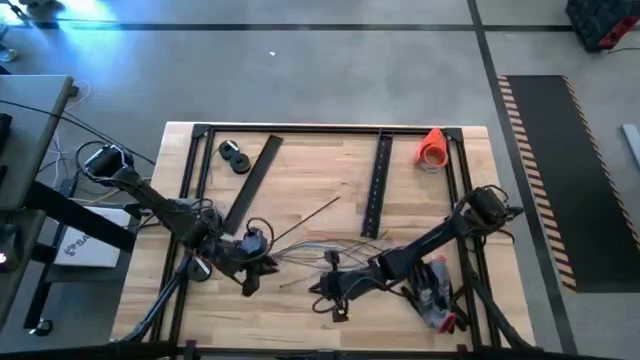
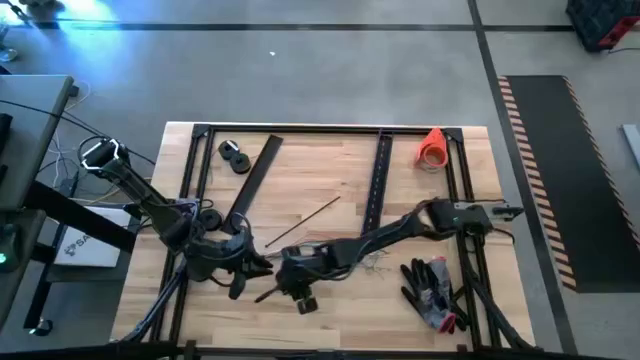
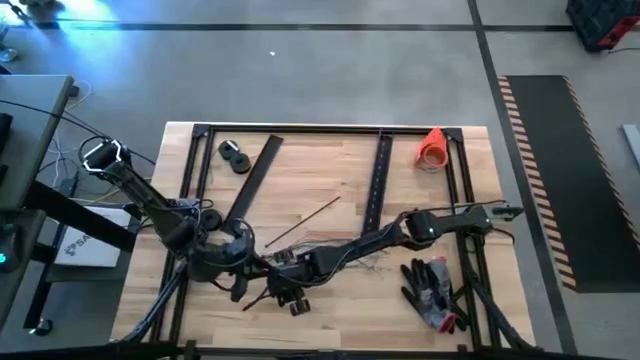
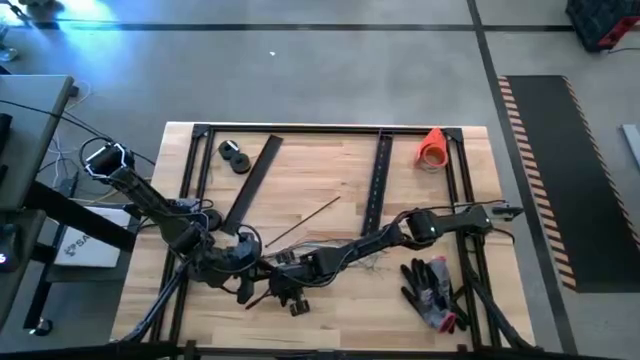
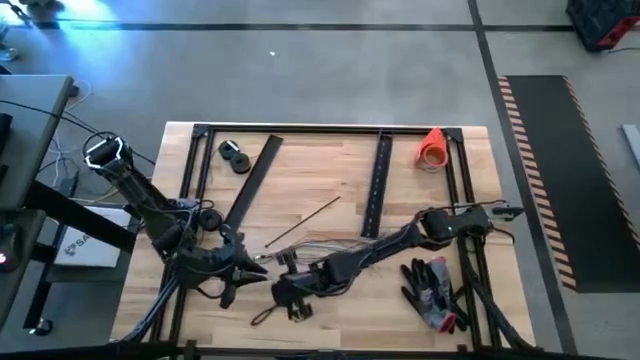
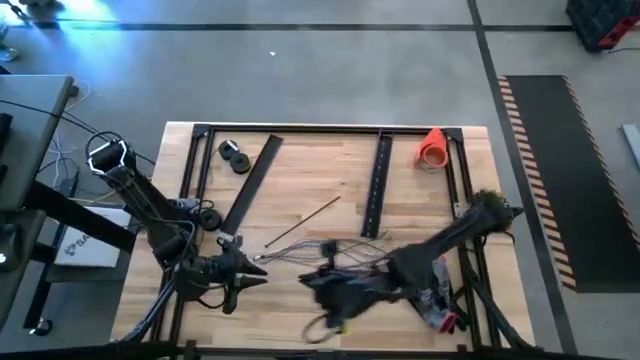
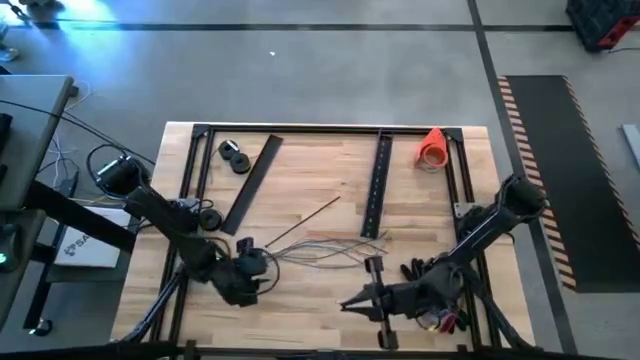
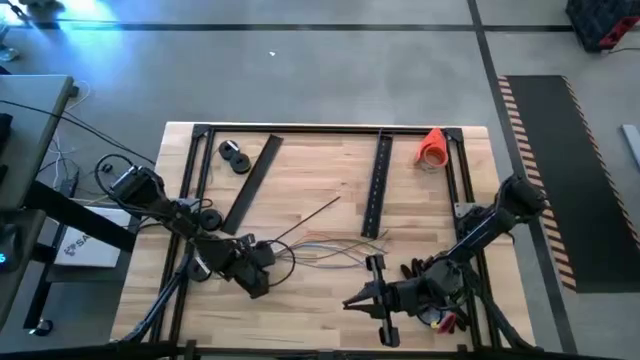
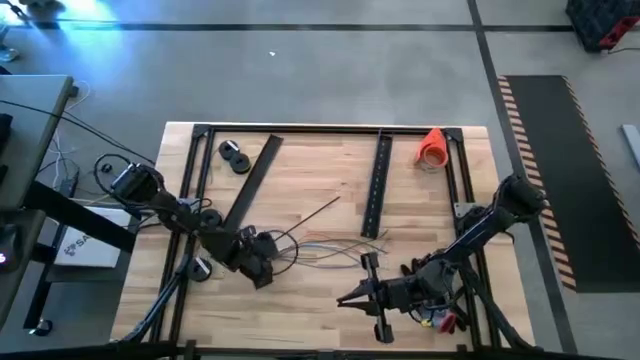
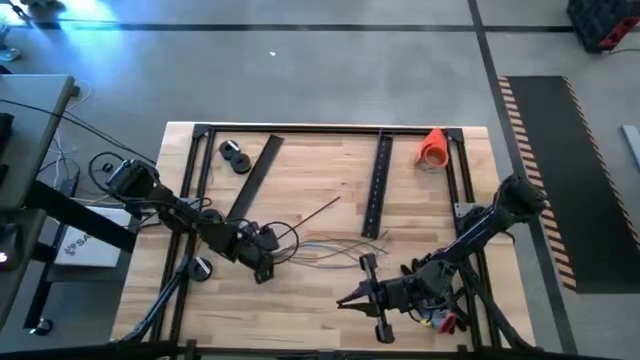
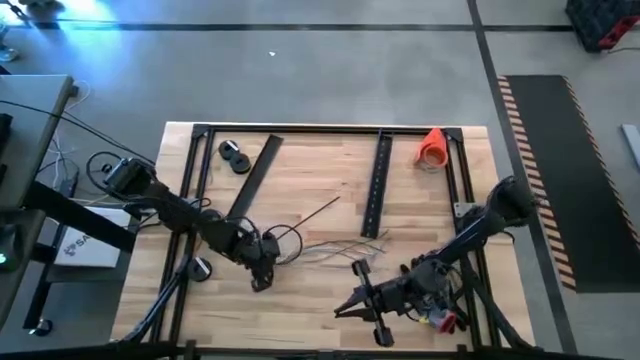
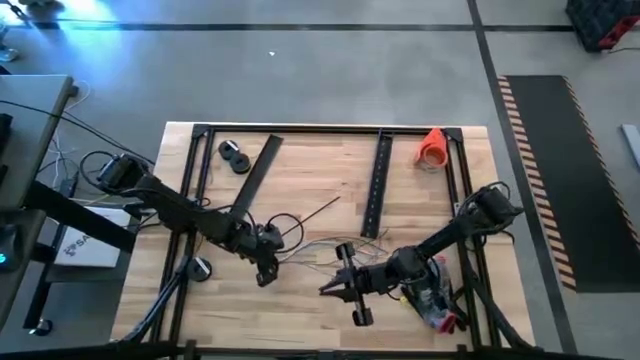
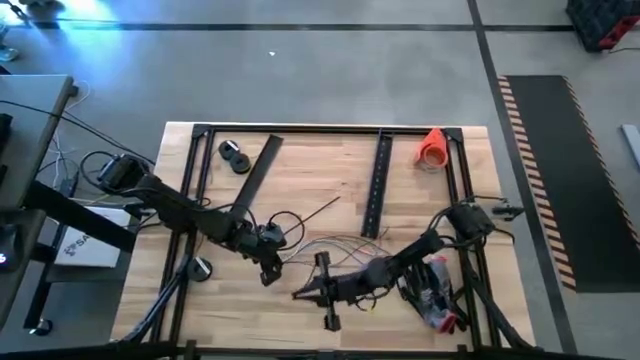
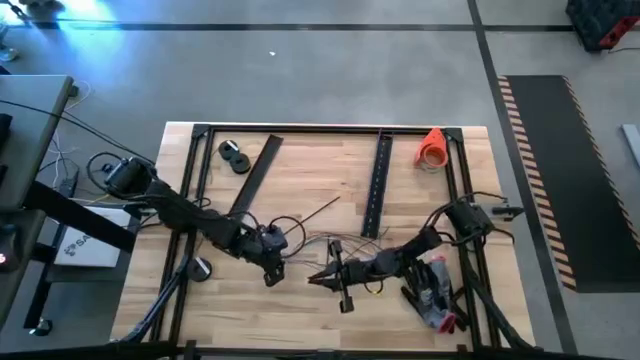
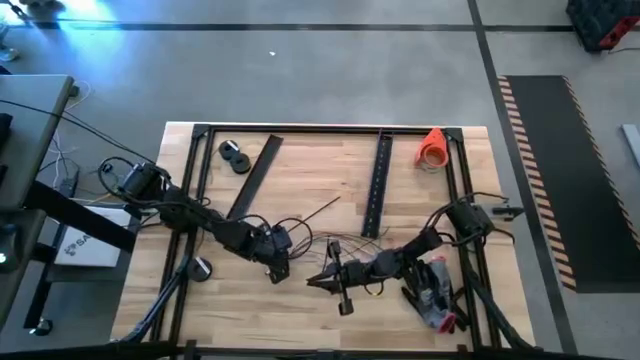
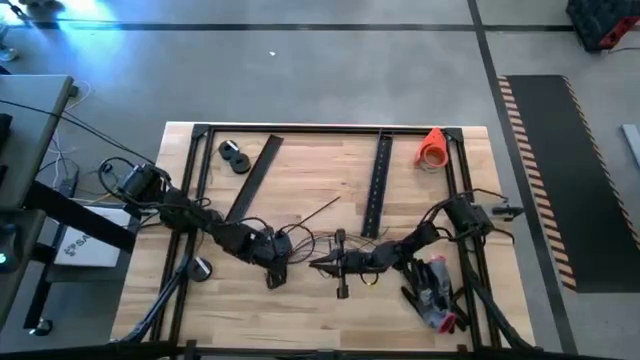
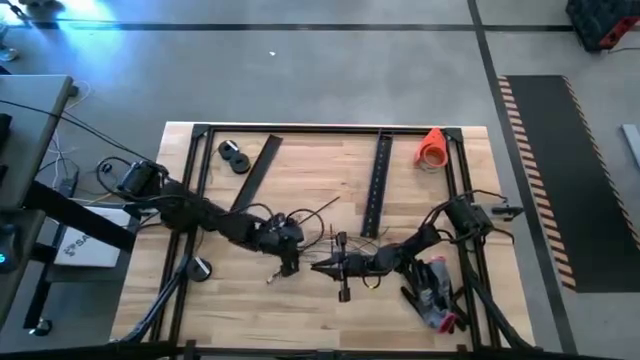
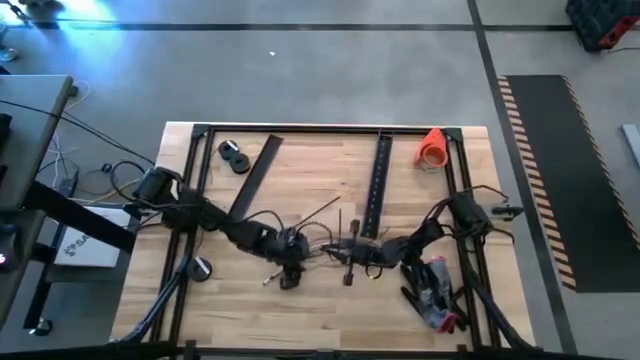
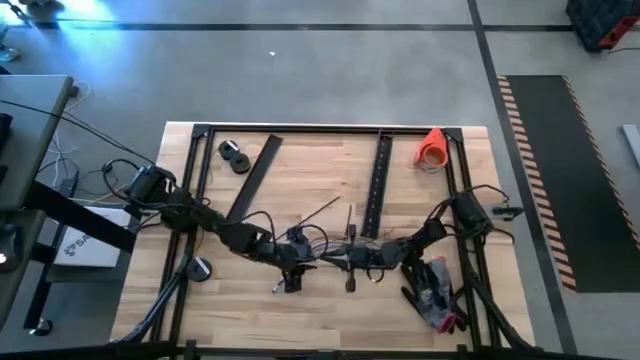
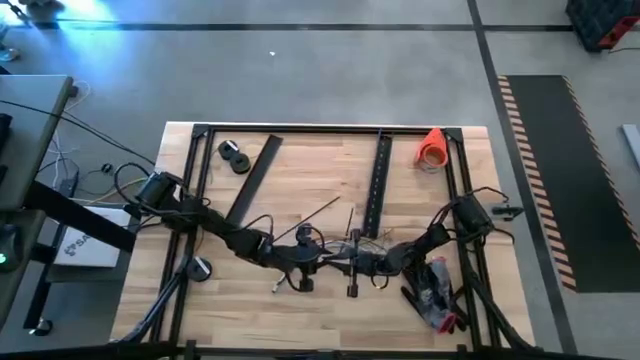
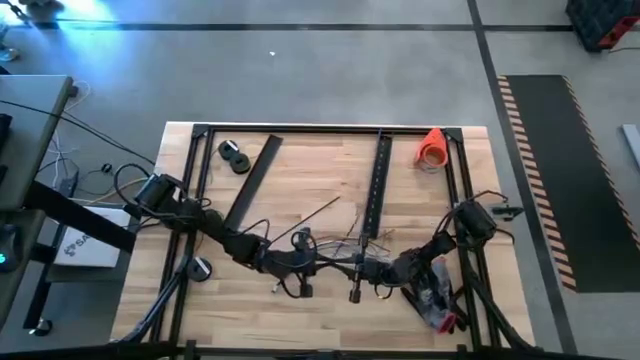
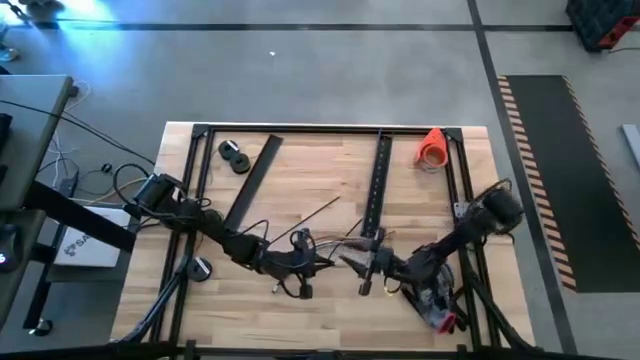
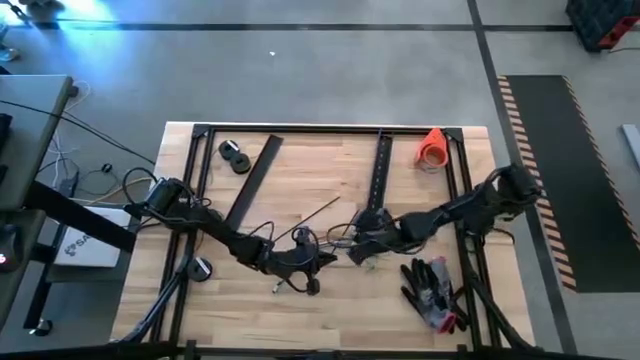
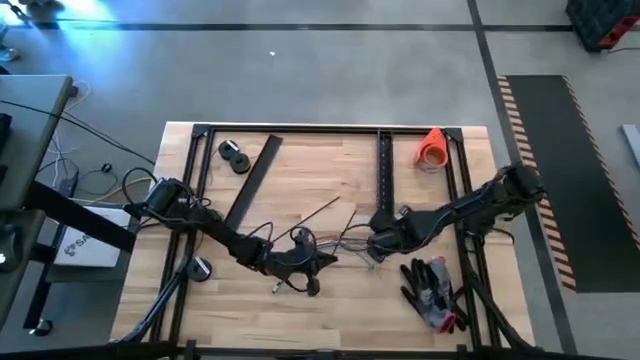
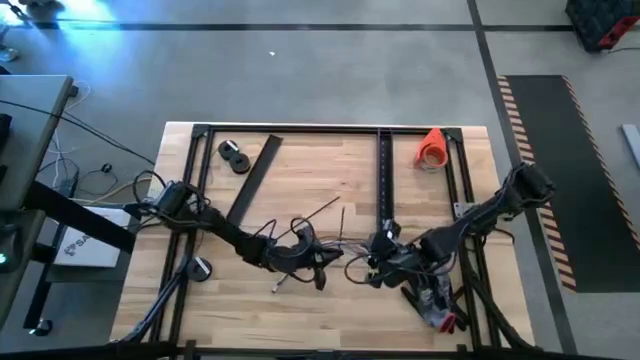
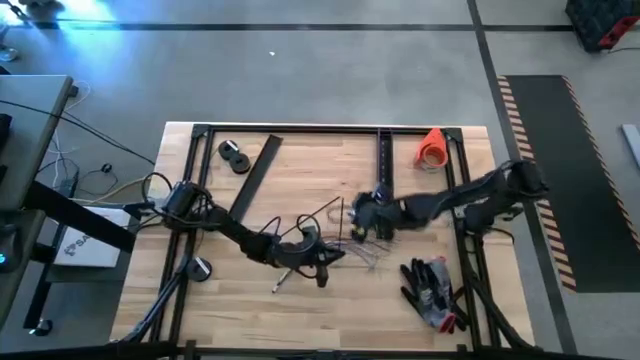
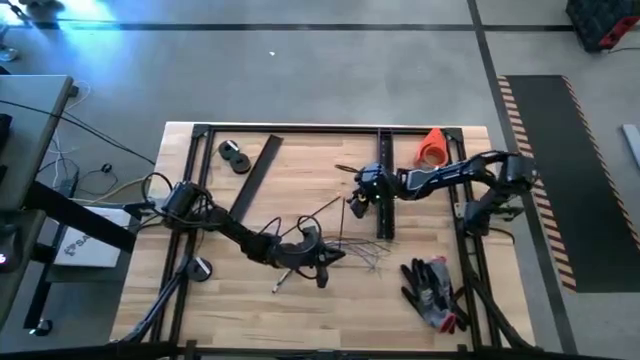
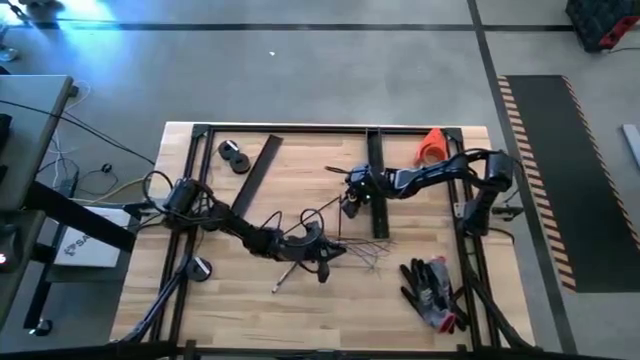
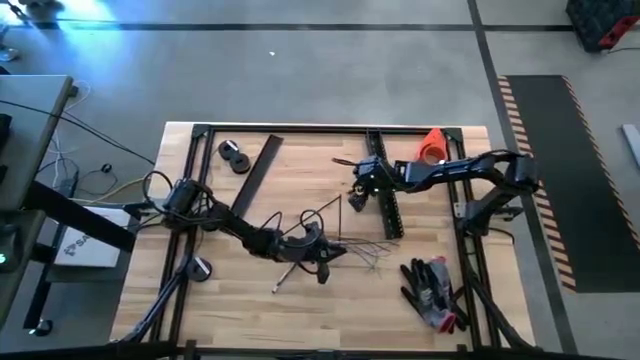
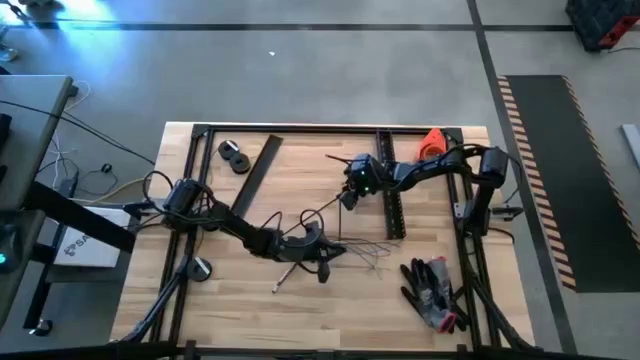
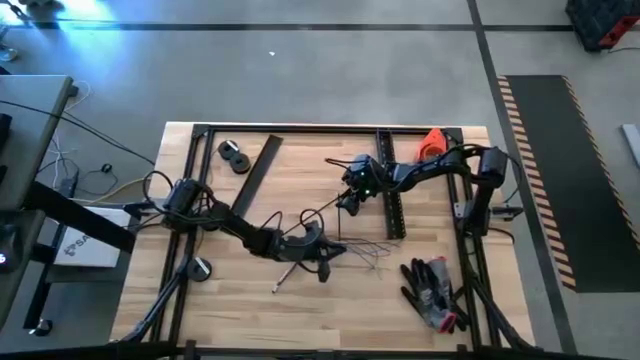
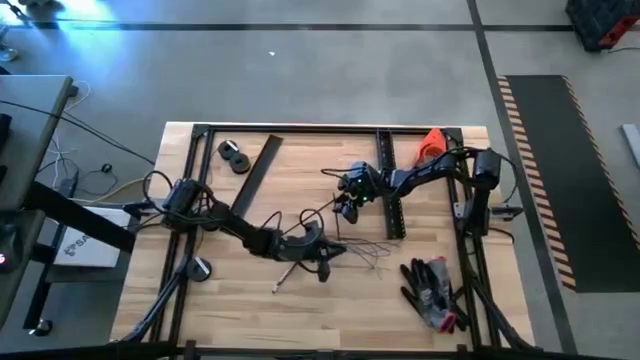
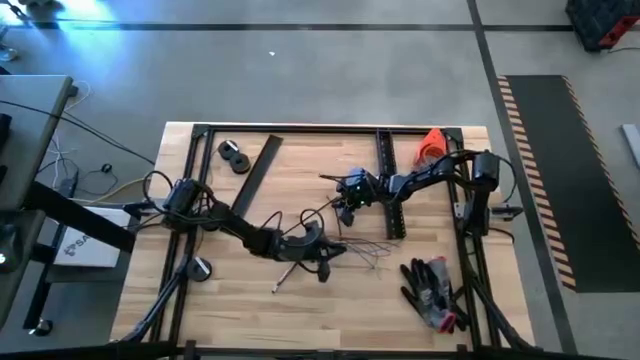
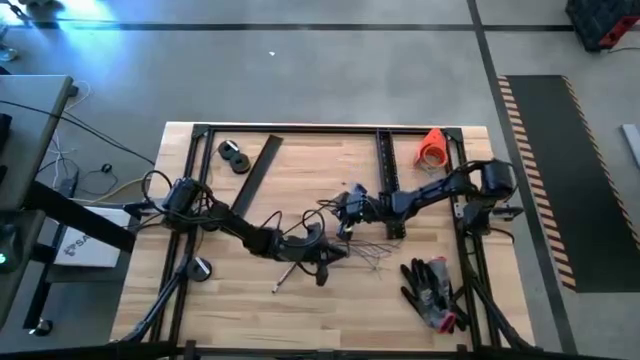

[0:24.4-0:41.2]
Task: Ziptie cables
Wrap the left black zip tie on the cables

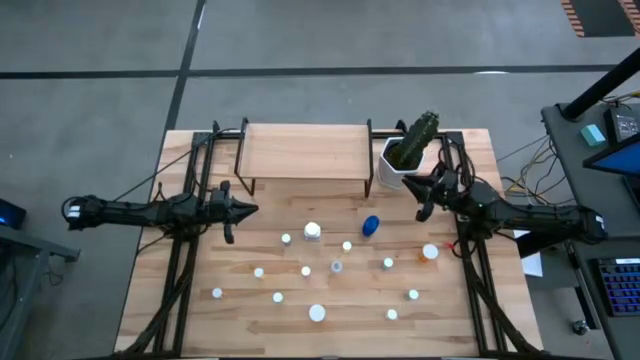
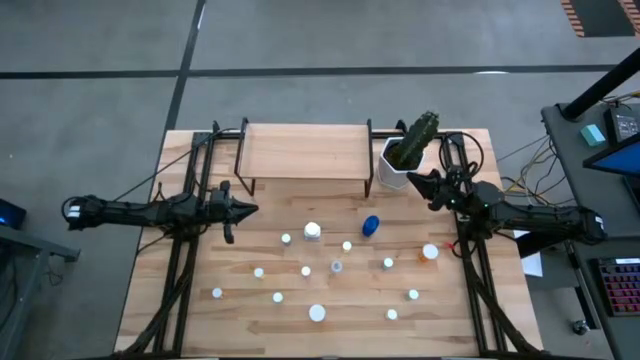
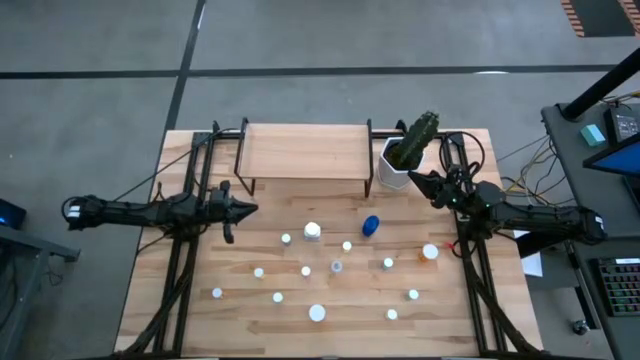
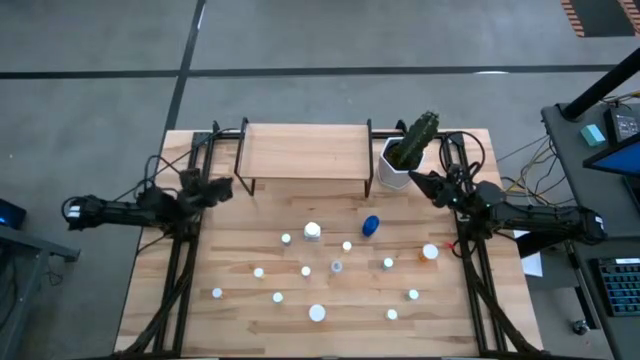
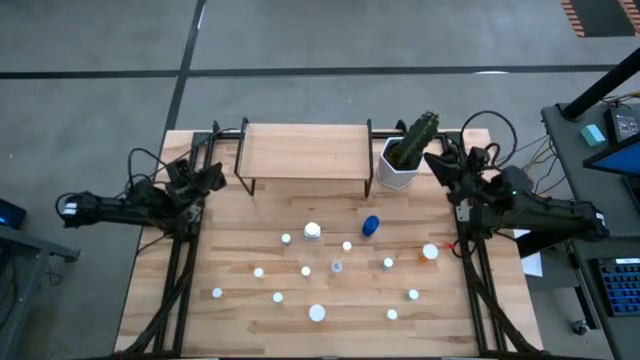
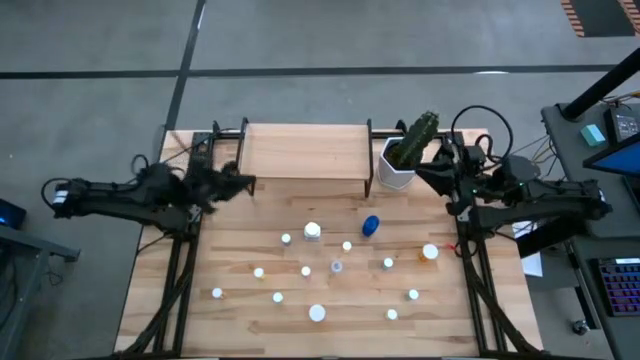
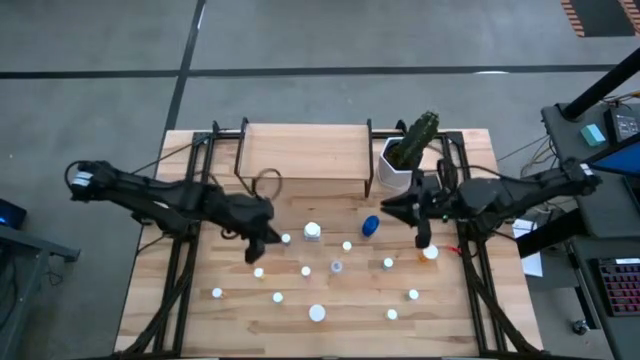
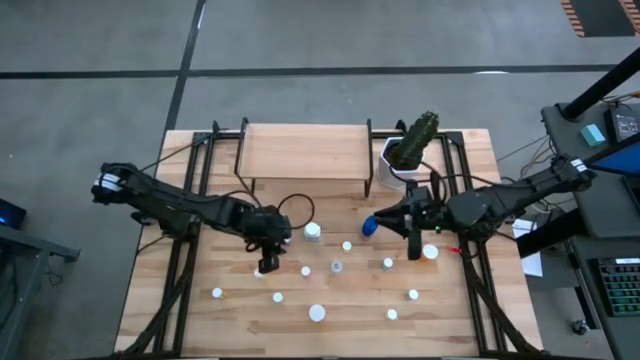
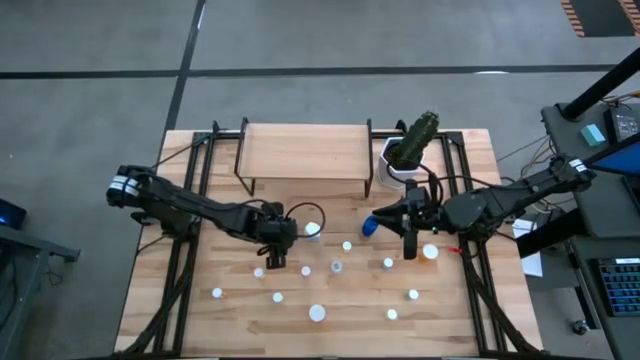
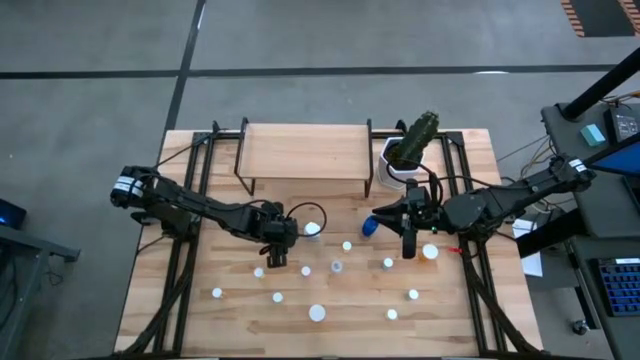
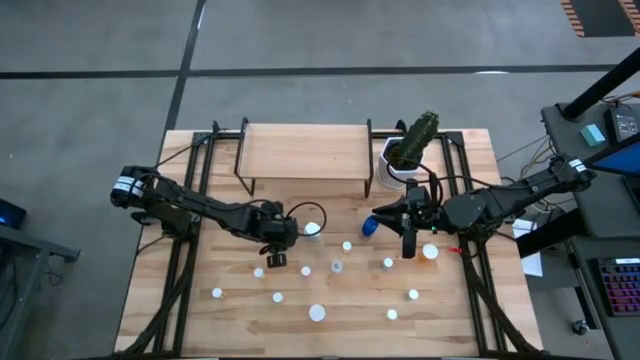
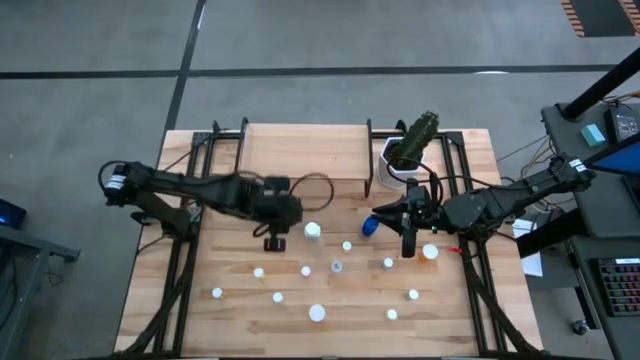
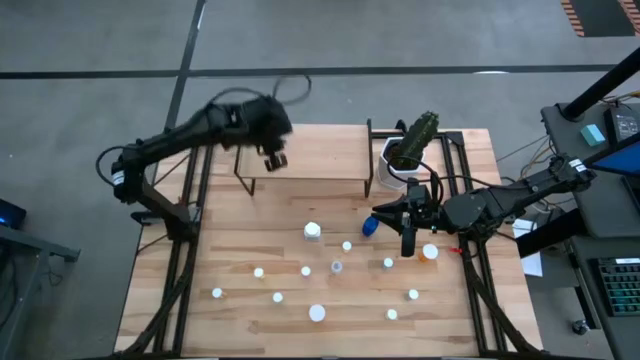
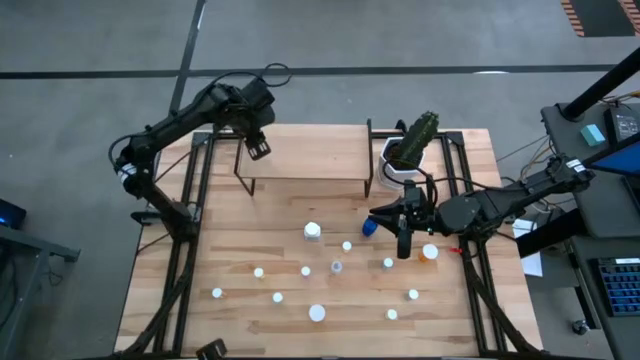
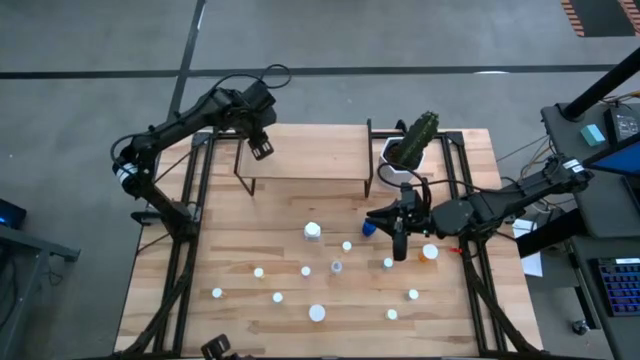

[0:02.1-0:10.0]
Task: Pick and place medicine bottles onto shelf by color
Put the light blue pill bottle on the shelf
